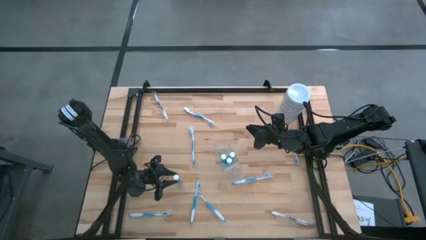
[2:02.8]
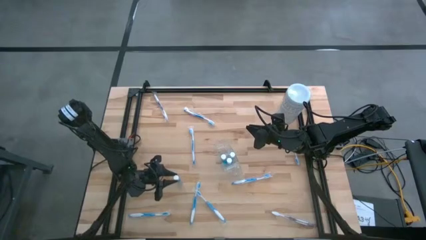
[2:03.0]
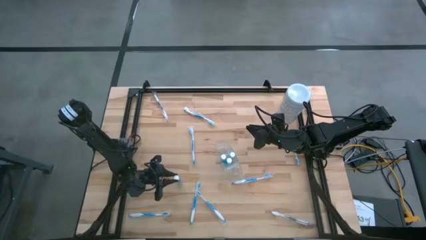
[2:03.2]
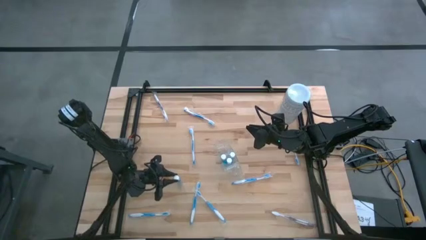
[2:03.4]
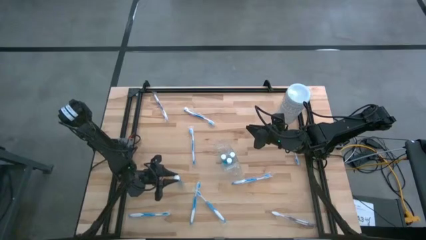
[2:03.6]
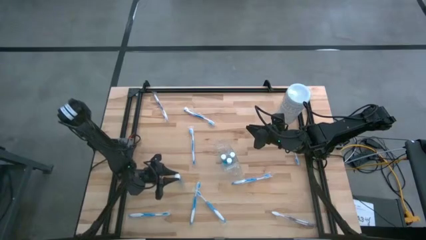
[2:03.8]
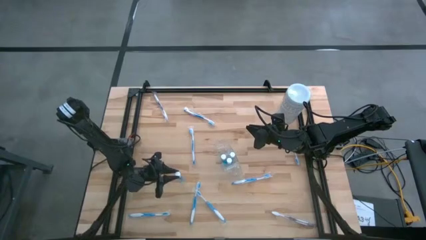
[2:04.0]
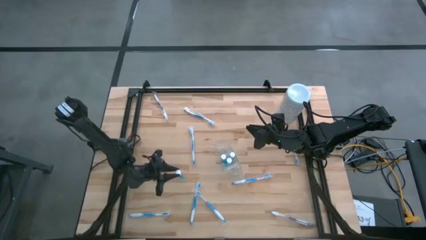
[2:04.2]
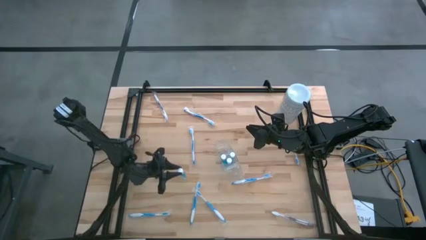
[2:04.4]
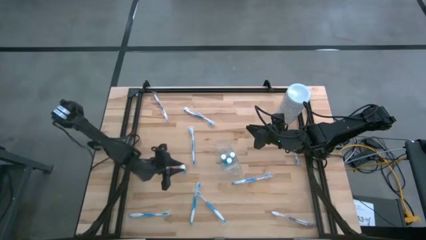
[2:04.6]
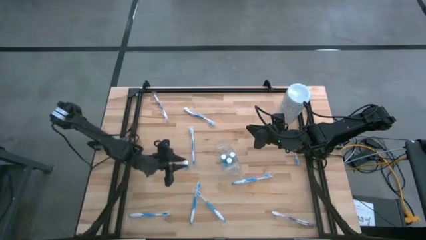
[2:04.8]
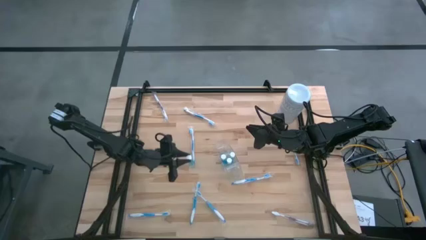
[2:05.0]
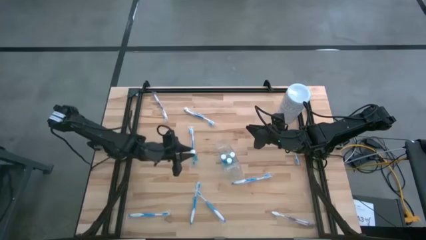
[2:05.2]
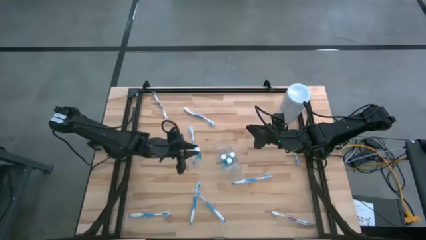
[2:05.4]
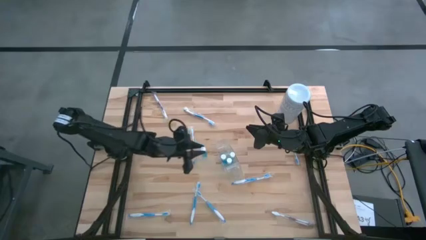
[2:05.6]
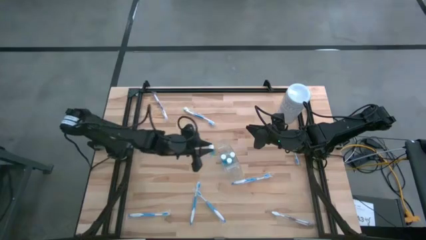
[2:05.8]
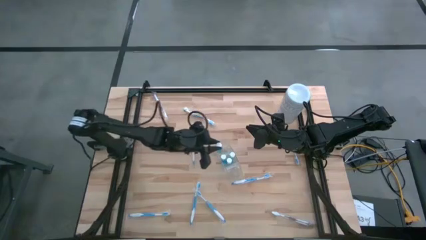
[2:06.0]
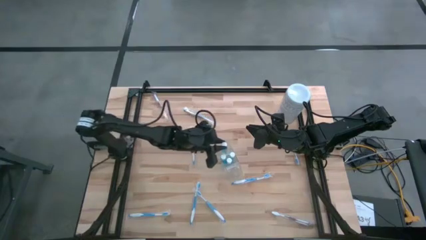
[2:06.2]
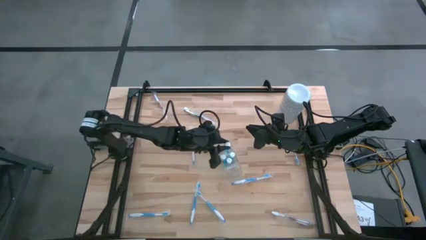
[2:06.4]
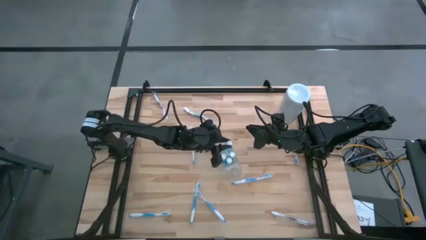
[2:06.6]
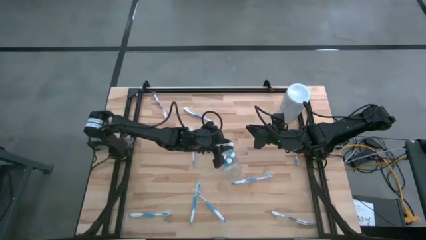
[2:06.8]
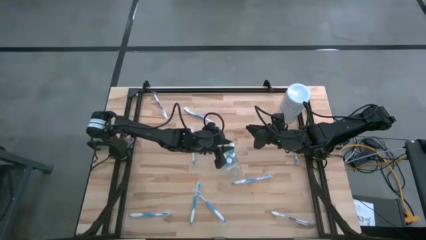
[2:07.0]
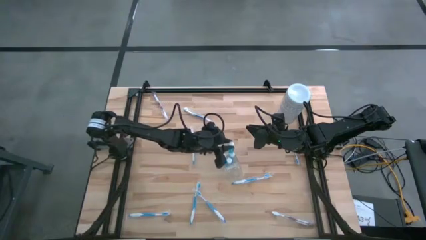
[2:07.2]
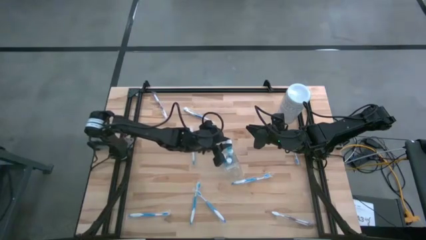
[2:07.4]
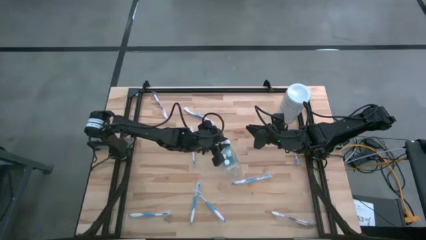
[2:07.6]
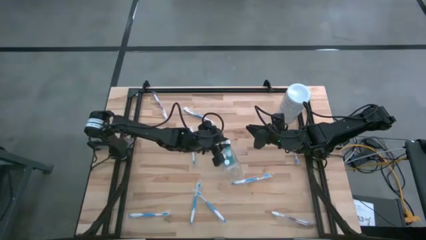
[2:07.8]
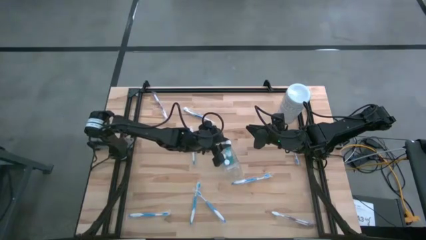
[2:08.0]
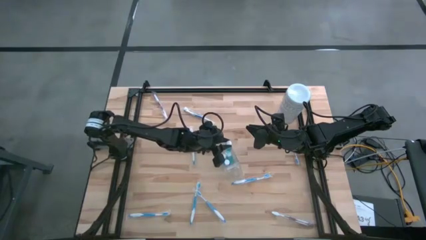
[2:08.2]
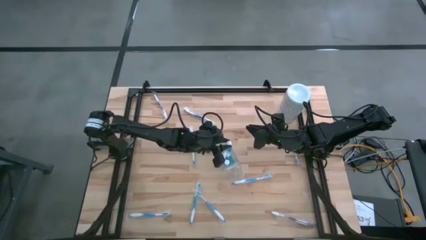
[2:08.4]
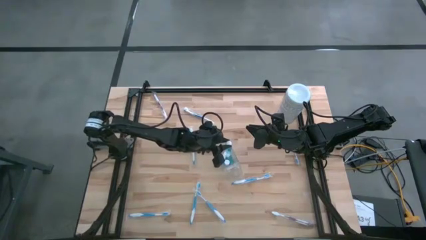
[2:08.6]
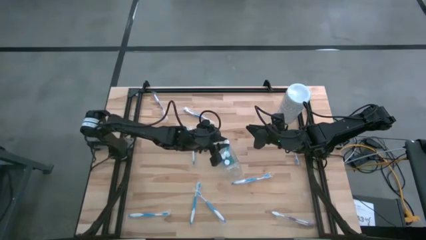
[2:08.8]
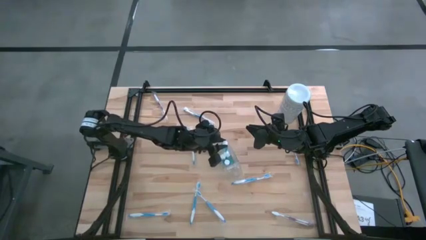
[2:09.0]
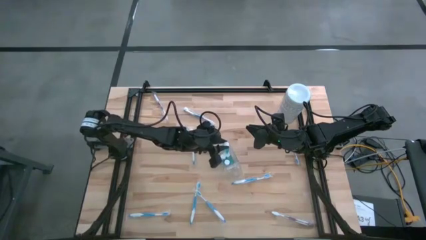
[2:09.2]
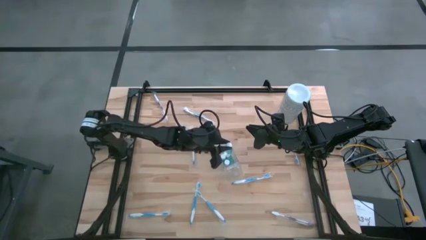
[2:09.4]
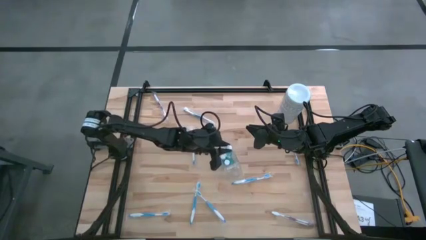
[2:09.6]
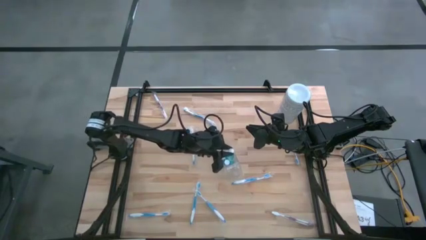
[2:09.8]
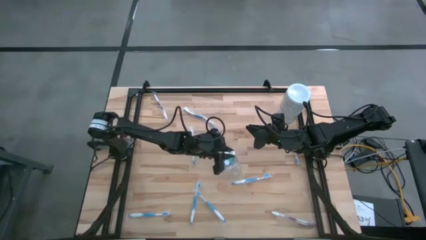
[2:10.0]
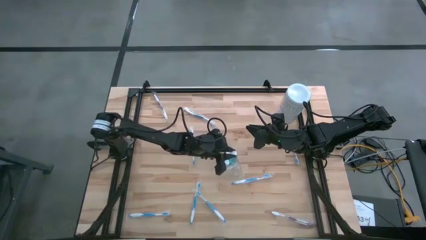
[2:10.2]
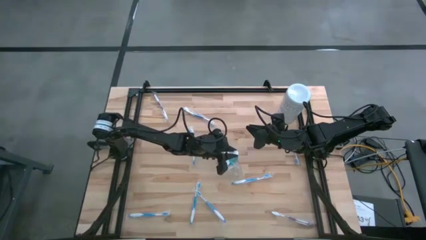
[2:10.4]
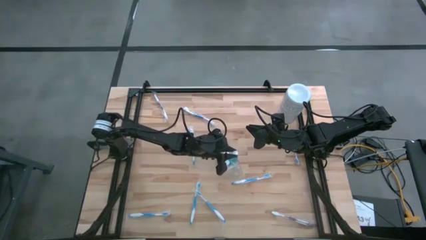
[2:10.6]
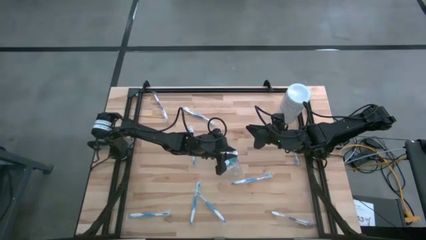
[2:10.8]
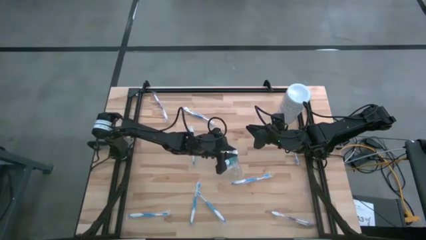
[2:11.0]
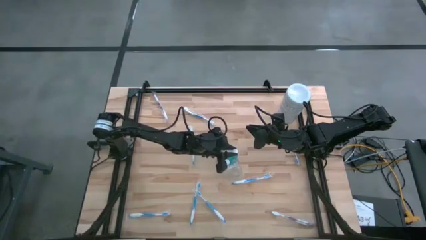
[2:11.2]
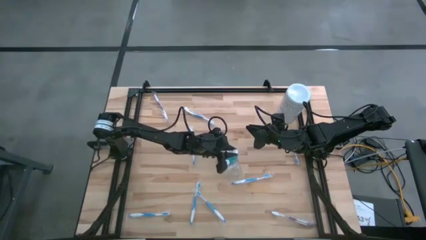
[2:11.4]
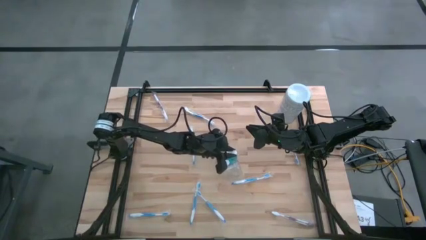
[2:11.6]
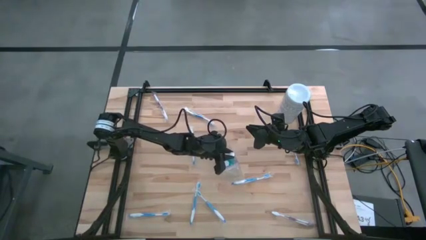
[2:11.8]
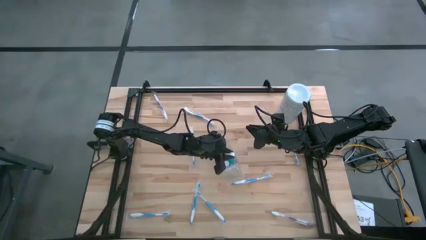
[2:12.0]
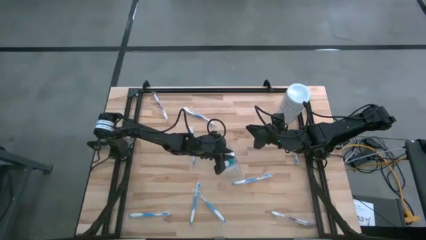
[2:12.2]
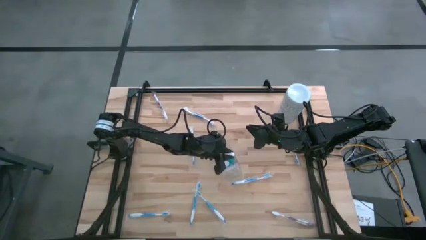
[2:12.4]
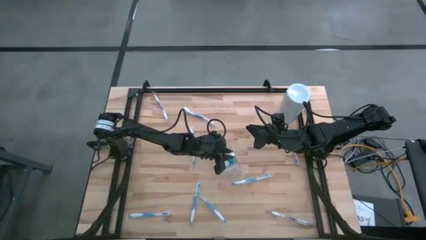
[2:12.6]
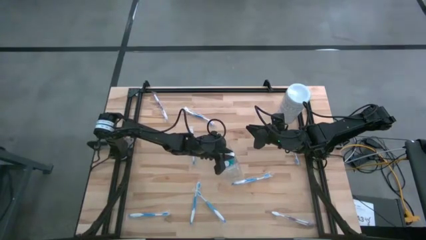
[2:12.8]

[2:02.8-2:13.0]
Task: Pick & Place toothbrushing station
Put the blue mouthwash into the middle section of the transparent organizer

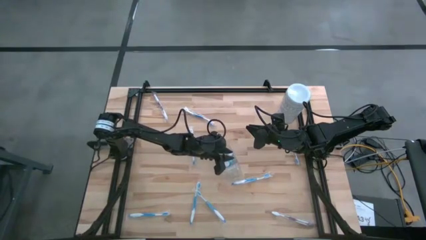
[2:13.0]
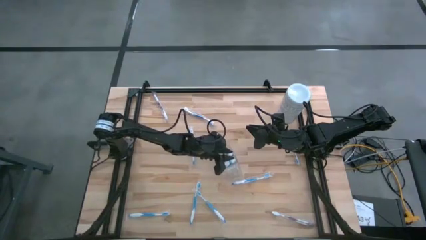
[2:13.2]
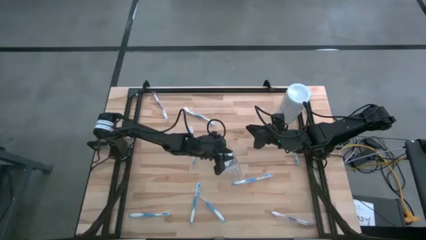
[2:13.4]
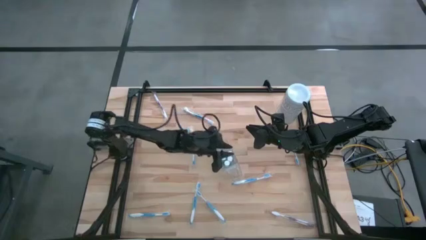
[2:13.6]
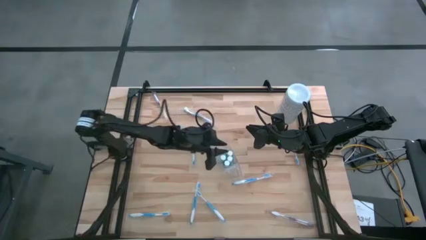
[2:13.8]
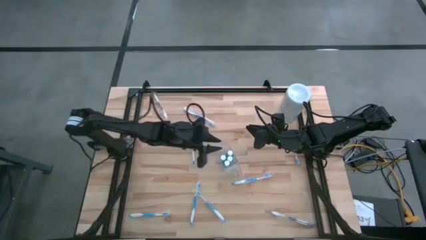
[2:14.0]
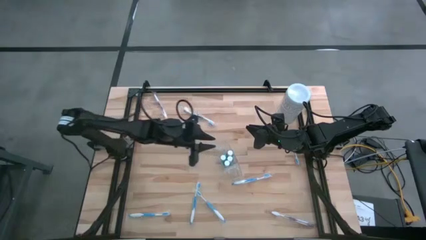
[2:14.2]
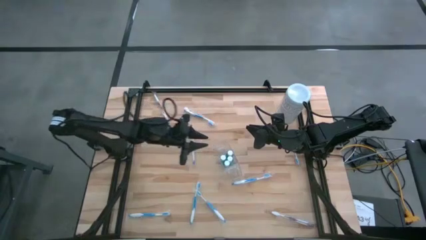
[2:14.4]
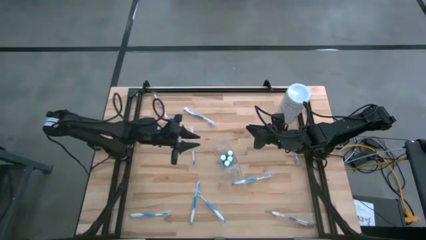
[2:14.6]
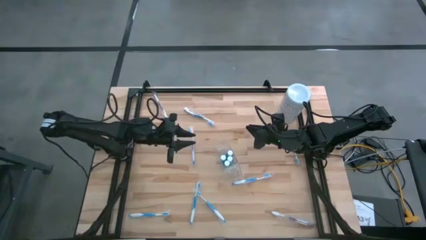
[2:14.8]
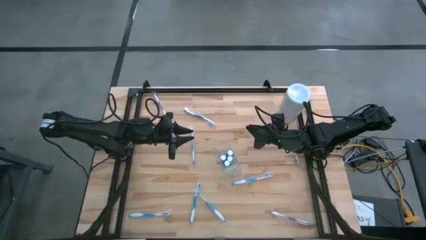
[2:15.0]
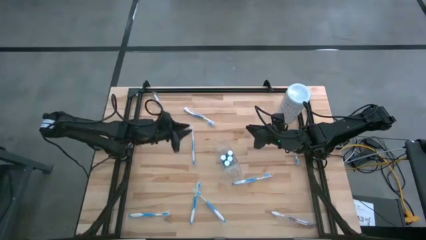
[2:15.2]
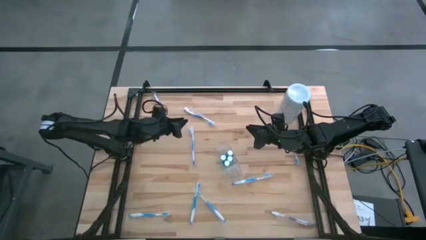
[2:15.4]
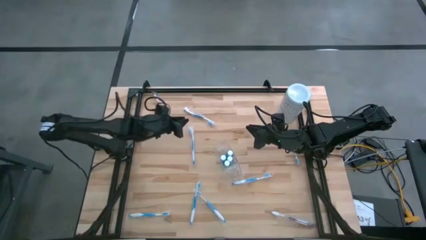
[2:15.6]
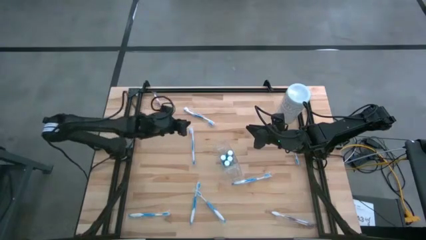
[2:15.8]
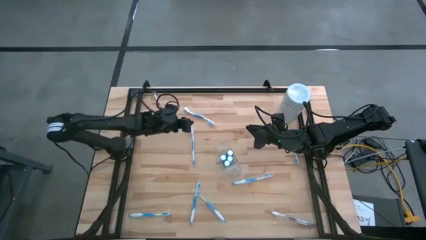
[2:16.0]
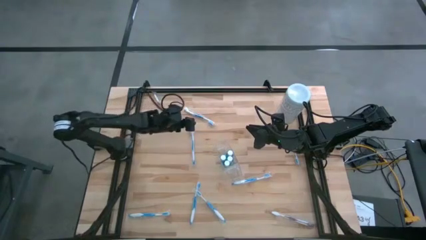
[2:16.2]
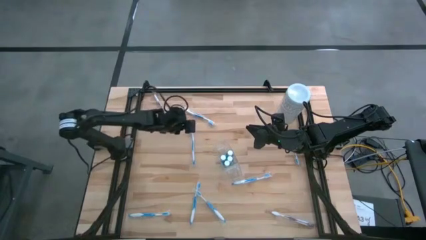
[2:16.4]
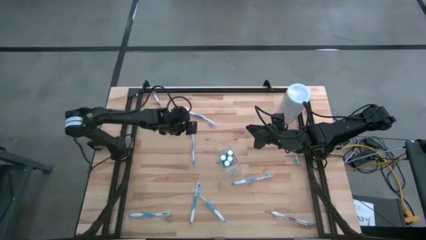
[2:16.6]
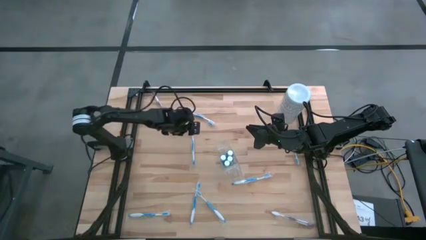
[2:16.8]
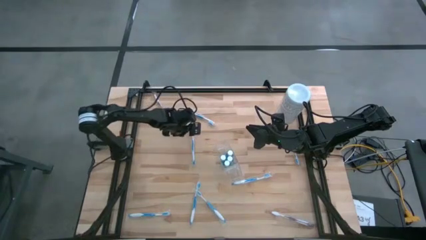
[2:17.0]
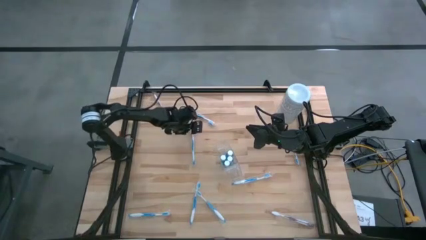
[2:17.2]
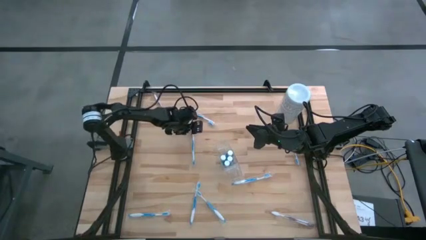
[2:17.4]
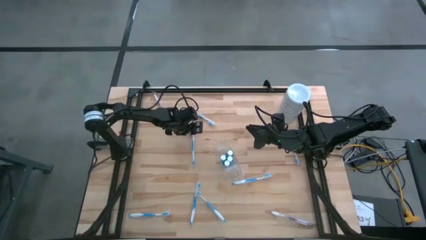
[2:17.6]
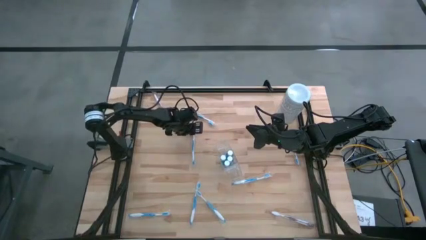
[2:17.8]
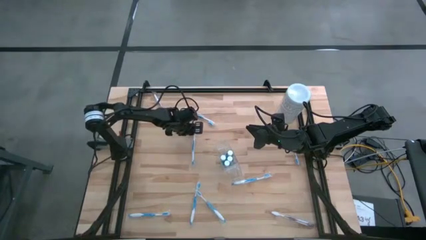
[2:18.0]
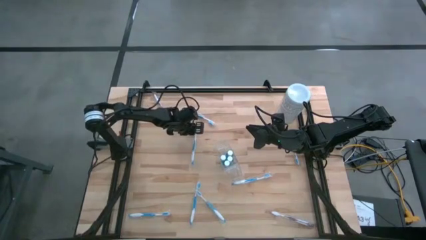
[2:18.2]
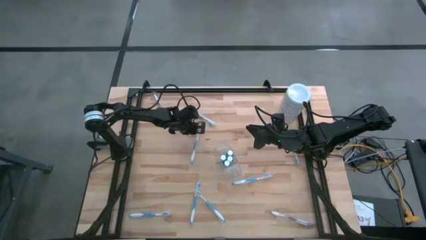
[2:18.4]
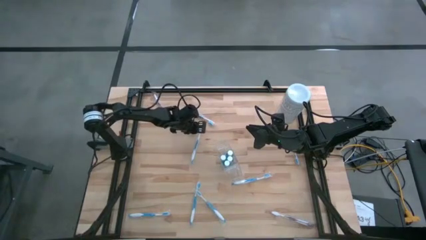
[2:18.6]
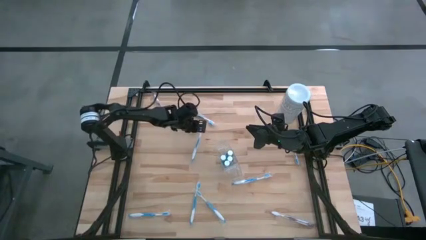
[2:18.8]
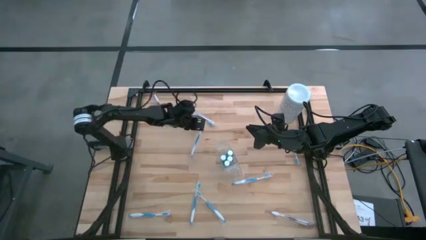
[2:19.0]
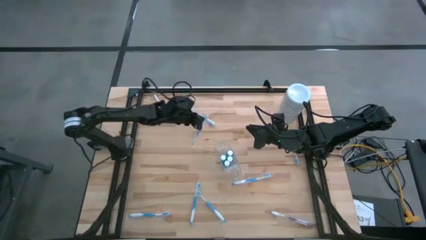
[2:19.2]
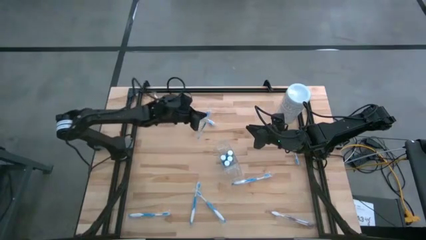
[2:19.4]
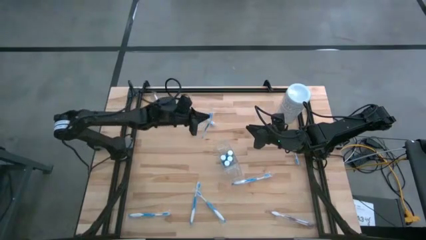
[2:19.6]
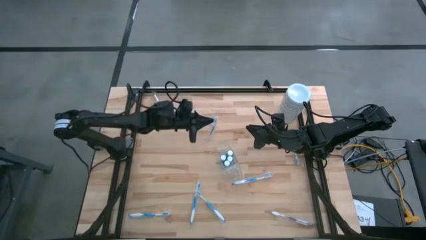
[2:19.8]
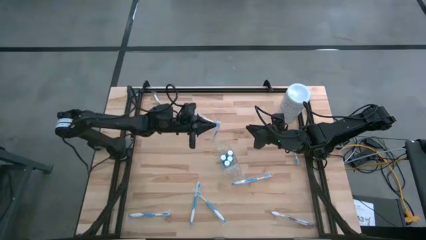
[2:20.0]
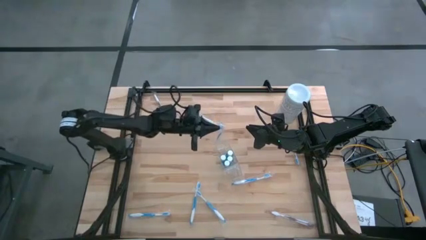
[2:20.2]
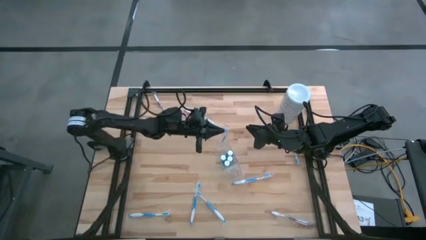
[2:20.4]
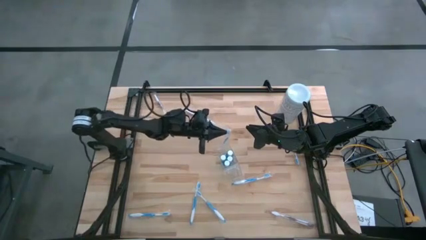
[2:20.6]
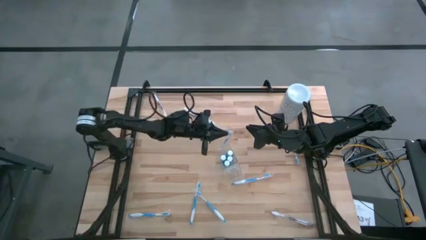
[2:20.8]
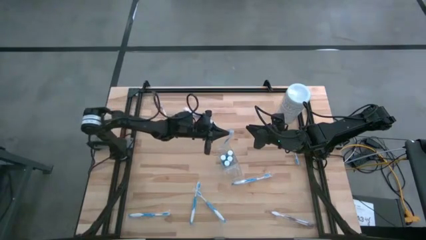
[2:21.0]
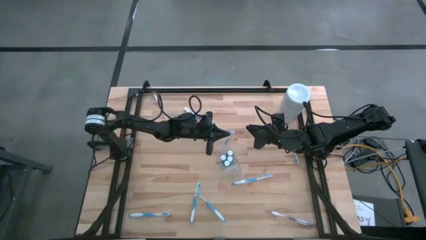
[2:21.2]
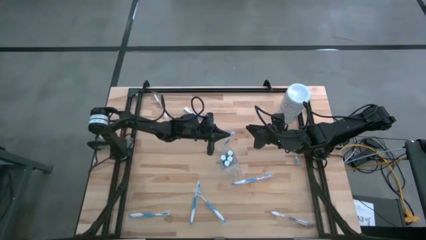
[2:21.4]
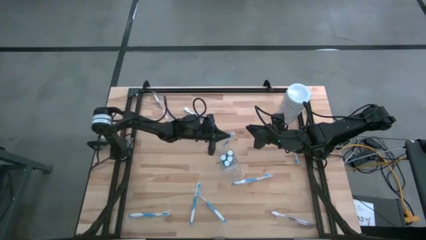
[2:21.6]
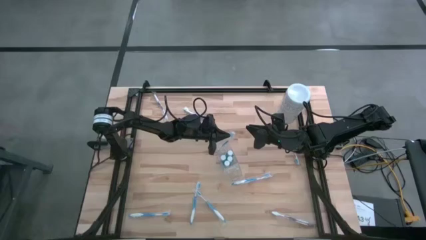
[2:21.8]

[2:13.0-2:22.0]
Put the blue toothbrush into the left section of the transparent organizer
